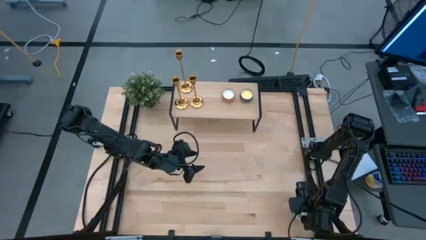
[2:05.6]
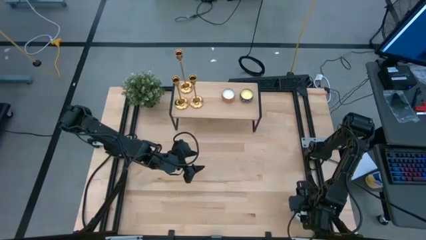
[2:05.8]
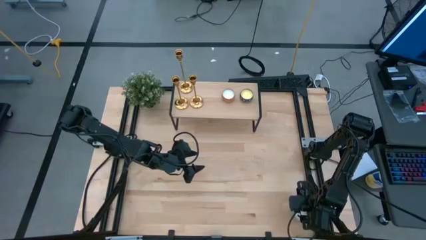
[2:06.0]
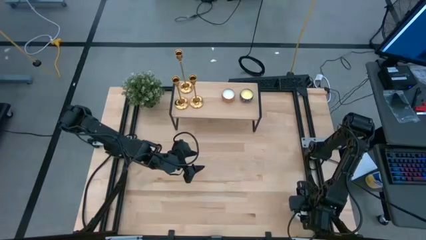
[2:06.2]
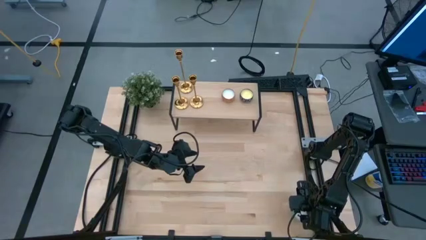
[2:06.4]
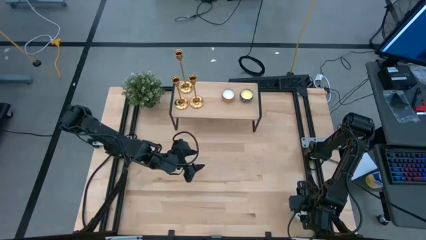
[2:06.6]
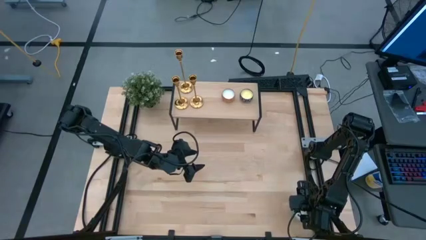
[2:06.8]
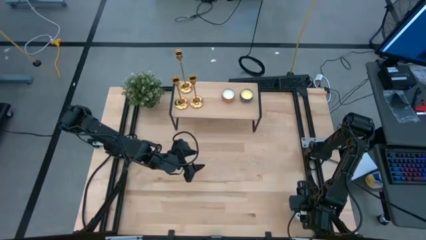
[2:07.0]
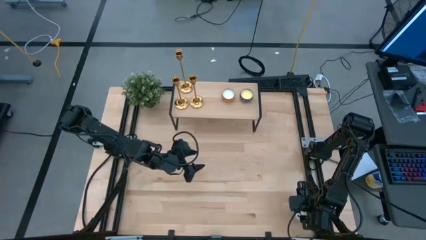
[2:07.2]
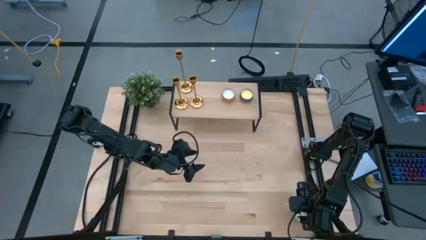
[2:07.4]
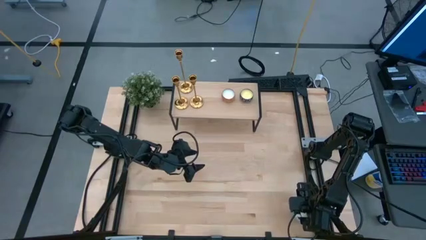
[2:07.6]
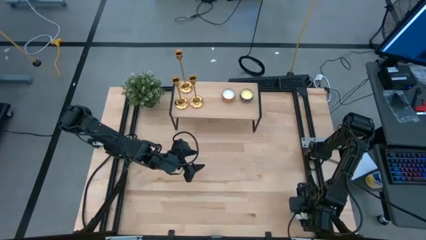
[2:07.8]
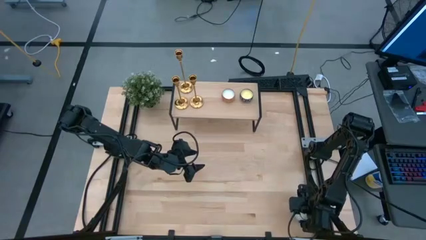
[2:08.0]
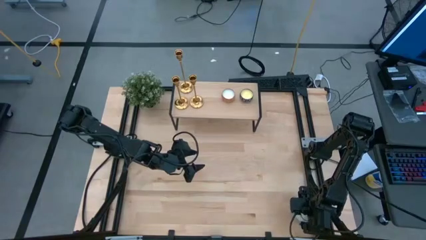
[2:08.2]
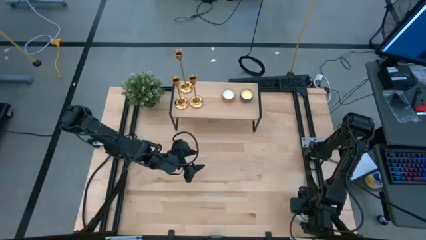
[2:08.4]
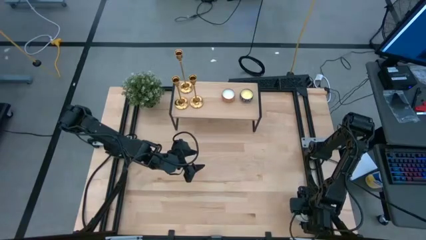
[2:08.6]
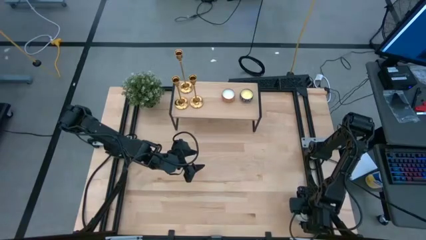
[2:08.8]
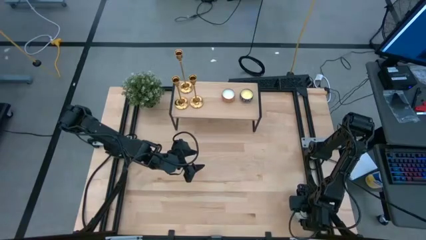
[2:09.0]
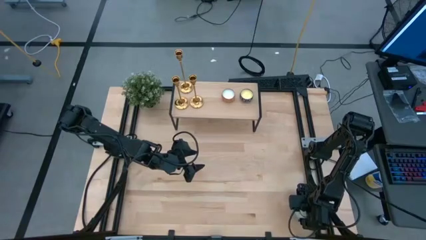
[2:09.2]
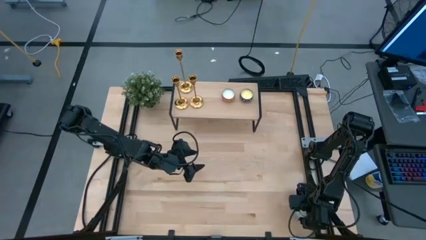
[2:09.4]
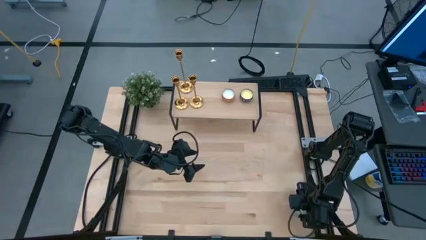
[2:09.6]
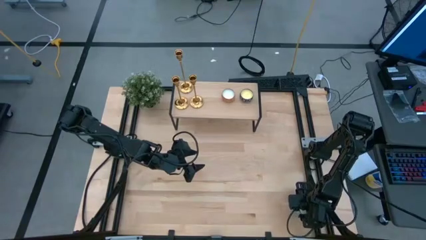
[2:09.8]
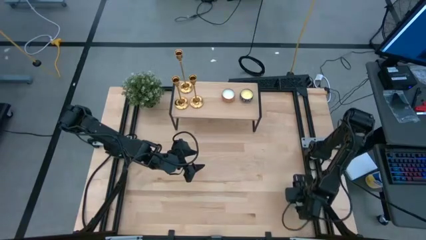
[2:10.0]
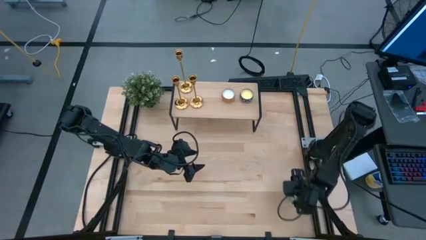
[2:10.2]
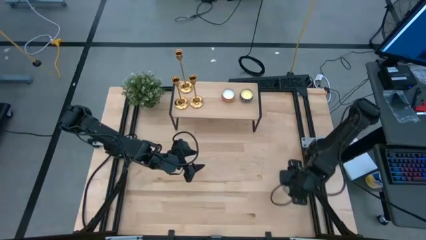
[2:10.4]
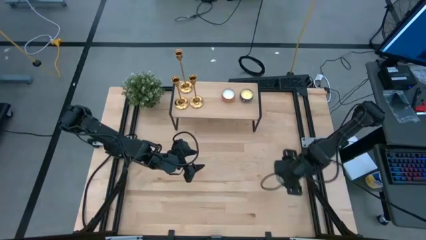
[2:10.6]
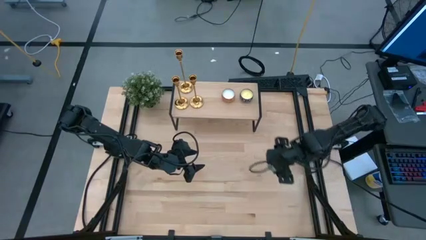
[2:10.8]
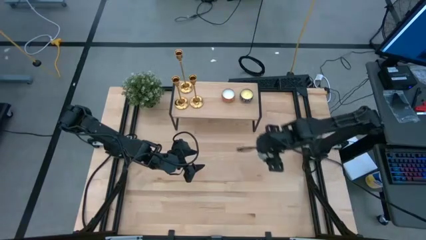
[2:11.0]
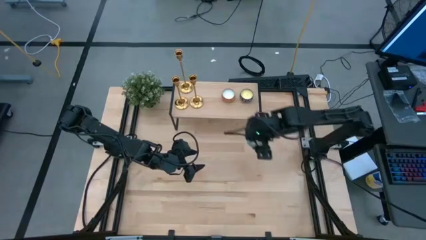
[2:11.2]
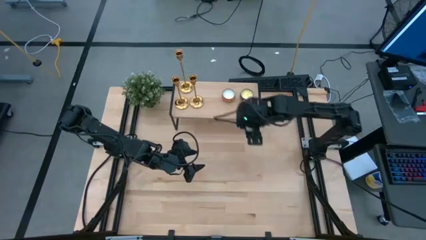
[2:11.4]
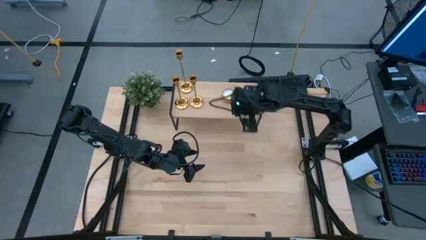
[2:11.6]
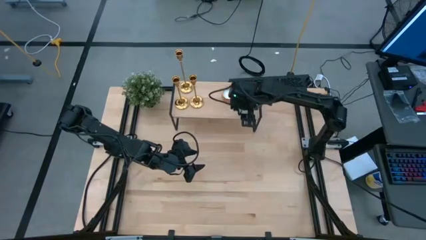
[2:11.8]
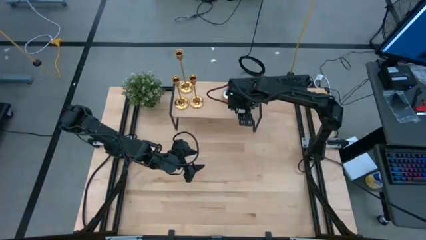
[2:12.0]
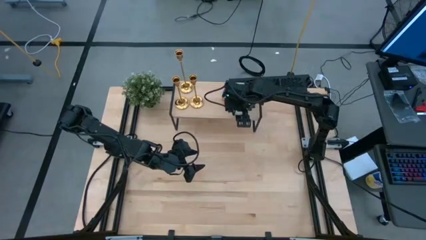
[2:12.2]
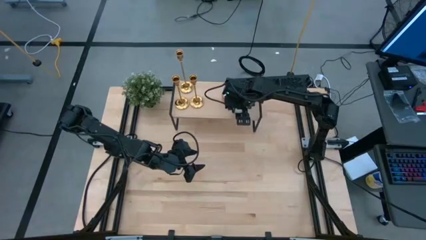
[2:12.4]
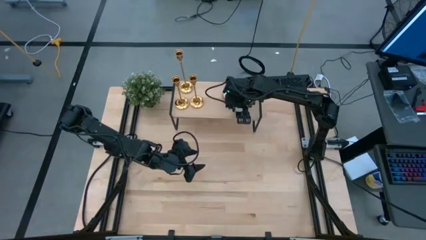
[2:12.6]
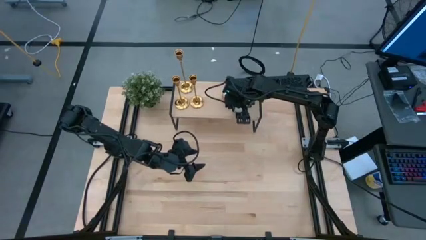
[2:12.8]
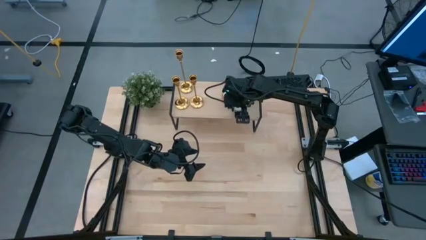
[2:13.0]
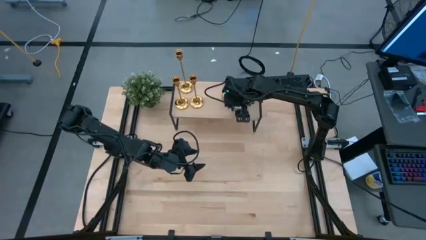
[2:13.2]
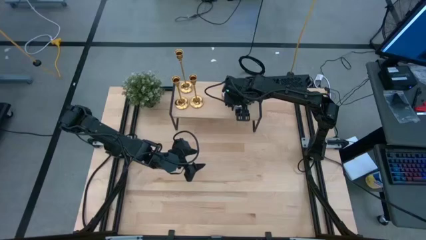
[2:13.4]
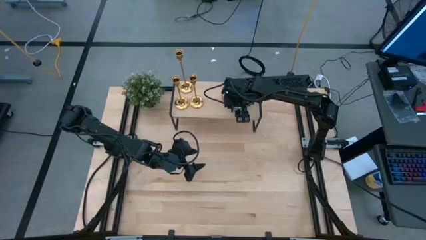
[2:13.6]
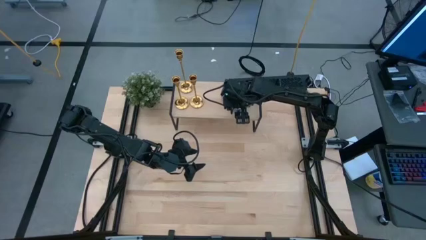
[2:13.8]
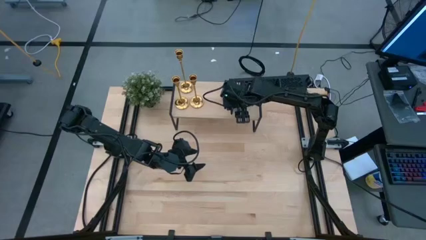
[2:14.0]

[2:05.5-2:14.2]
Task: Pick & Place candle stick holders
Put the blue patterned scented candle on the shelf

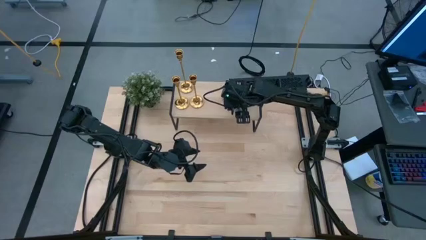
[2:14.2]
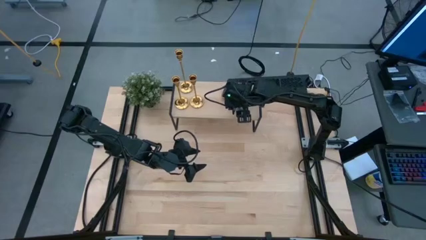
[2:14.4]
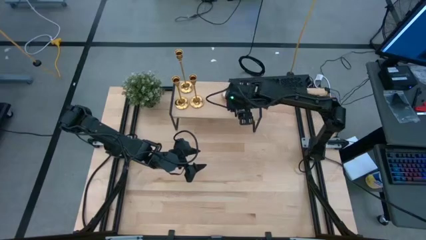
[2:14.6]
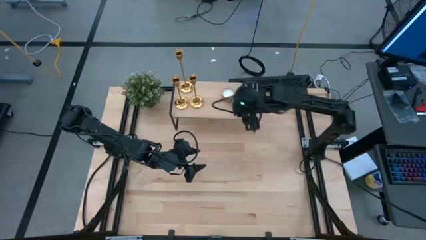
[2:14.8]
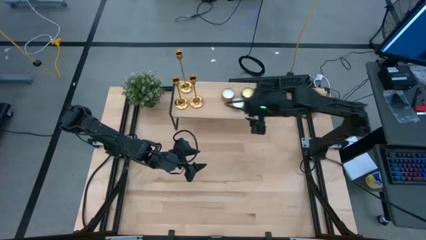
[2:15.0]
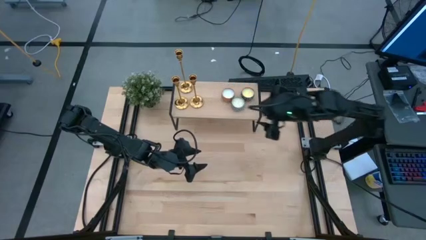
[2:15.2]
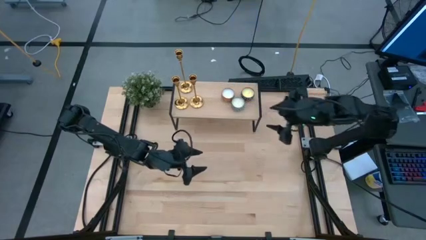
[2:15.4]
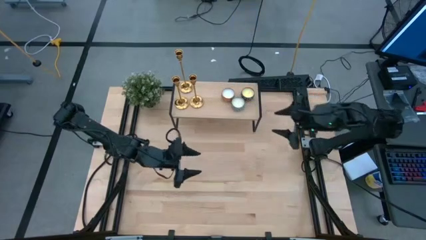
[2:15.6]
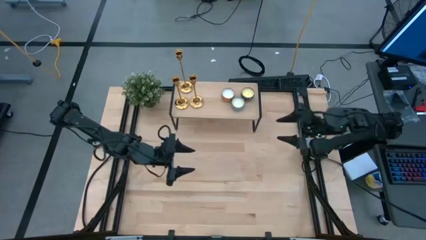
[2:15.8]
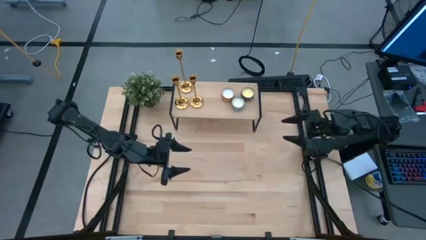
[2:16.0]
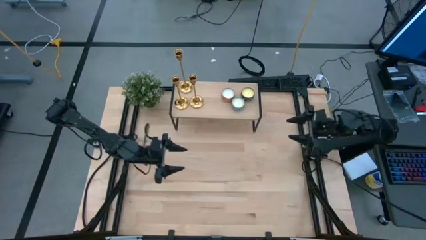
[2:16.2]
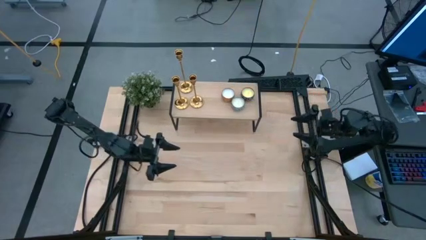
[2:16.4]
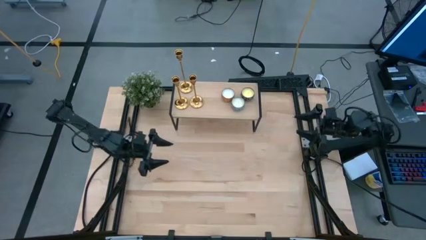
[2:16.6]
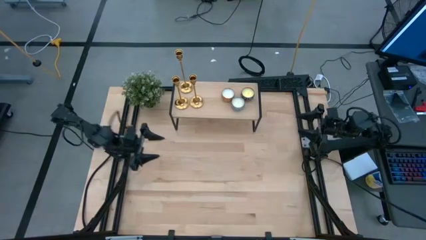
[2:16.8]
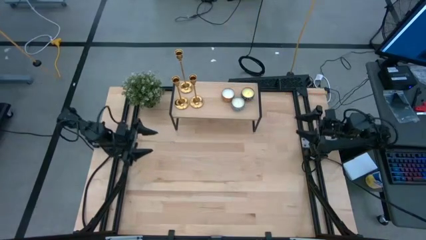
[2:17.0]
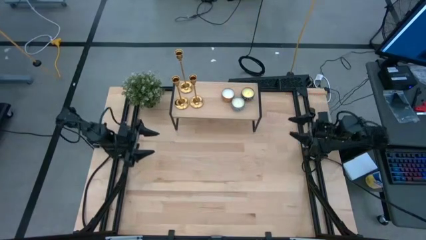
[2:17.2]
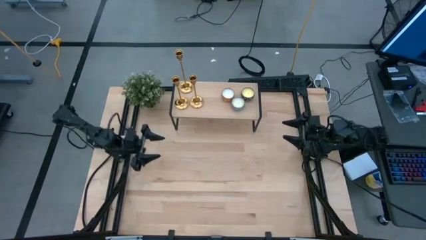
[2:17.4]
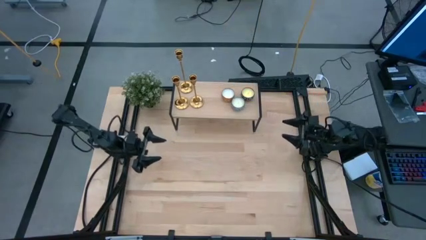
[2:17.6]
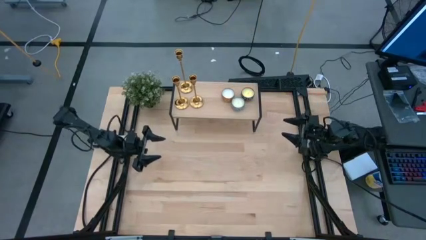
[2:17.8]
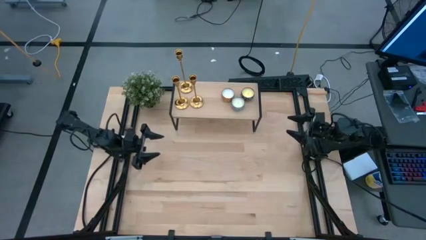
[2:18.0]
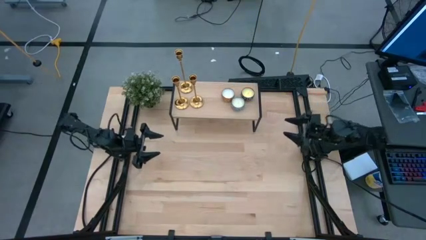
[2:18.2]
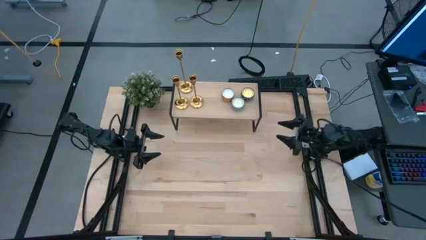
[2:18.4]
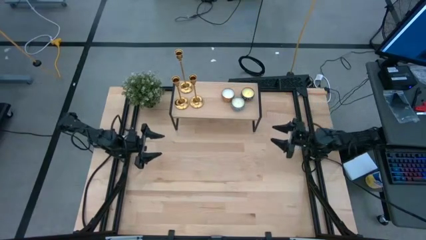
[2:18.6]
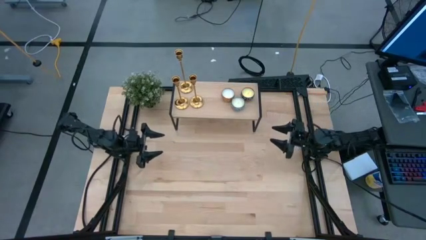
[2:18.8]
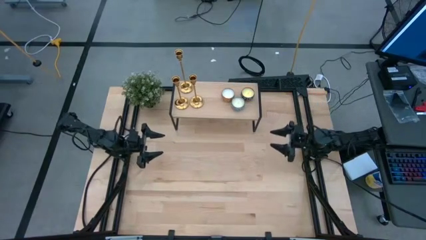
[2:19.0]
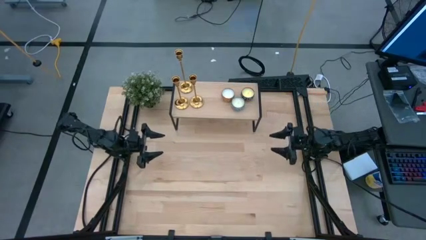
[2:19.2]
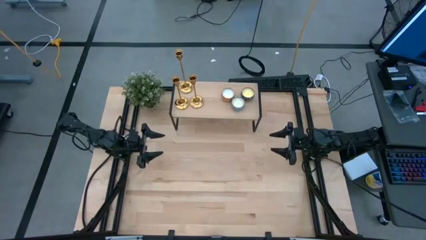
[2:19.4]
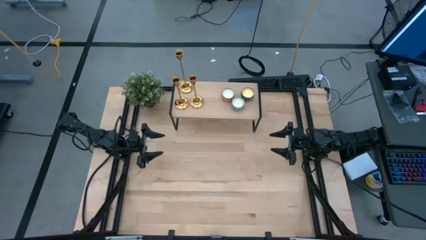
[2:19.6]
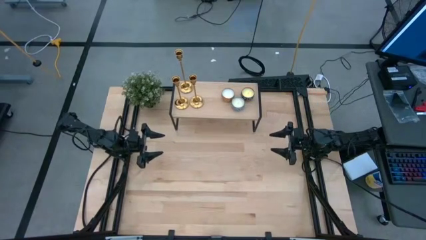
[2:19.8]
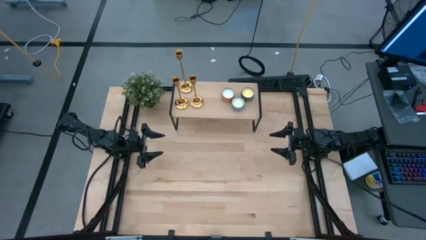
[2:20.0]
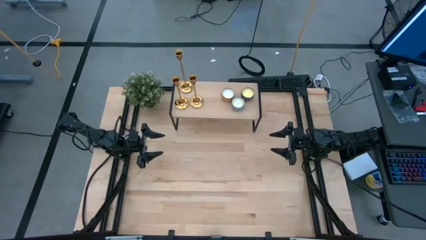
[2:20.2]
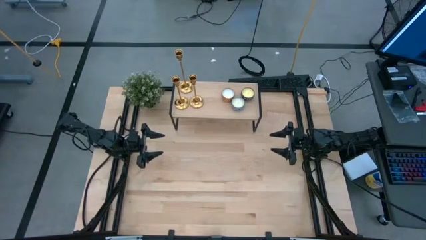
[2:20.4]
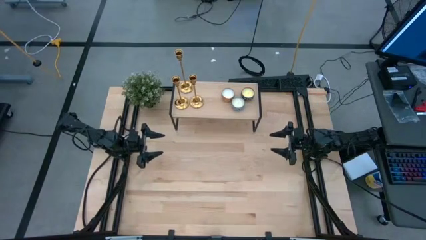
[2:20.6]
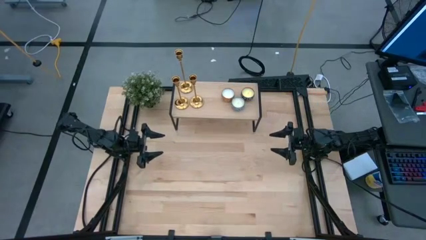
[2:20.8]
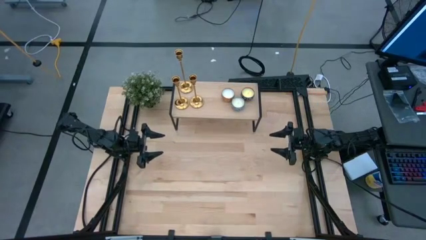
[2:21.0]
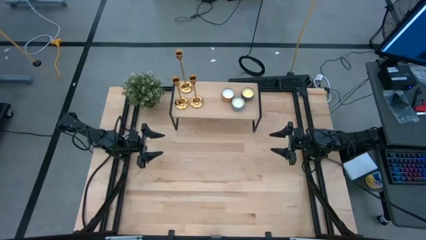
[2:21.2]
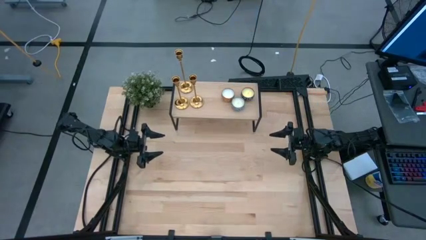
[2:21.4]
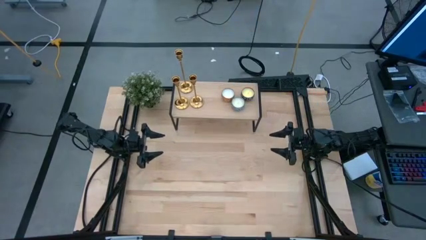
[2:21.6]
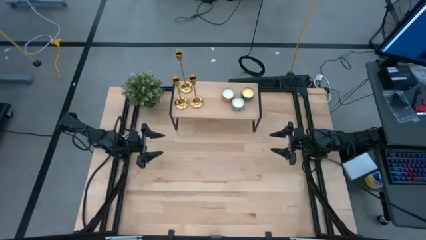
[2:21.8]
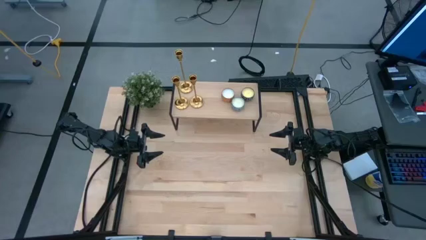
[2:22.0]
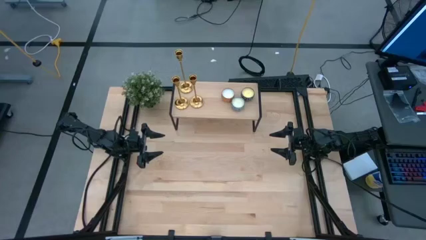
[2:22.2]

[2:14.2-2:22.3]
Return to Home Position
